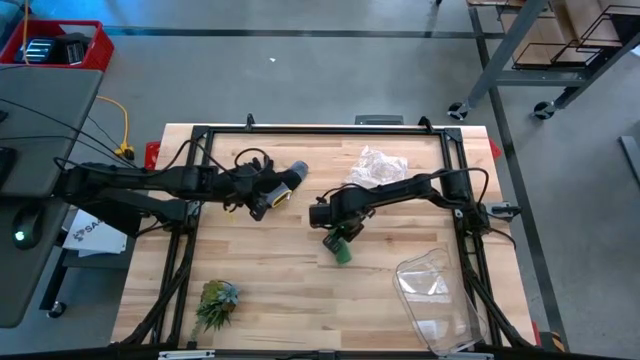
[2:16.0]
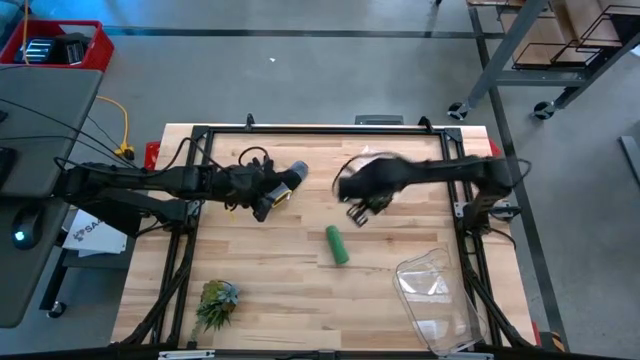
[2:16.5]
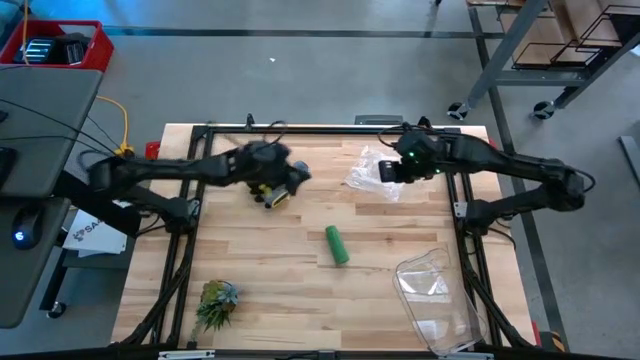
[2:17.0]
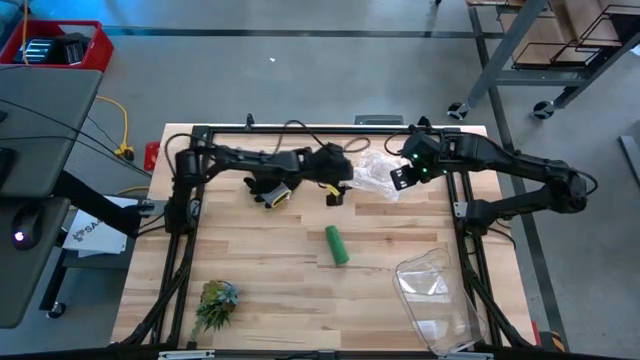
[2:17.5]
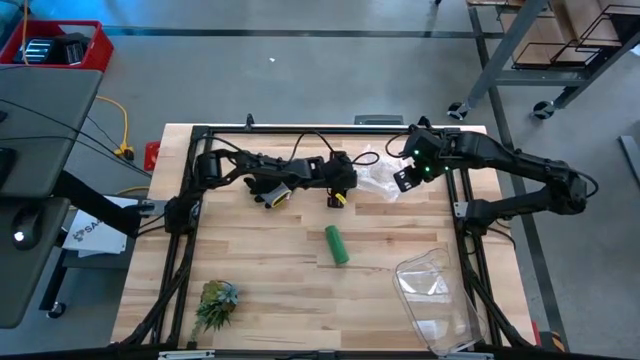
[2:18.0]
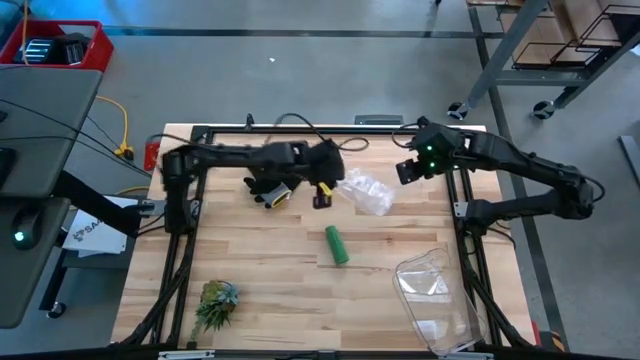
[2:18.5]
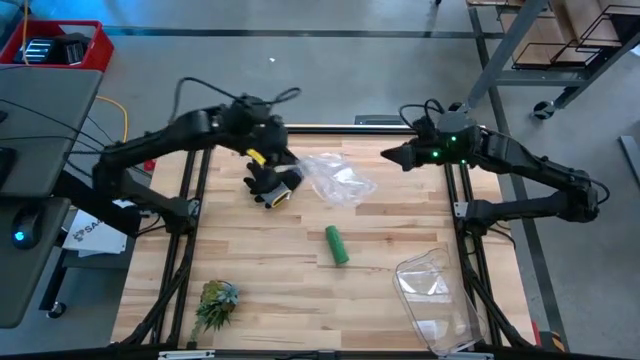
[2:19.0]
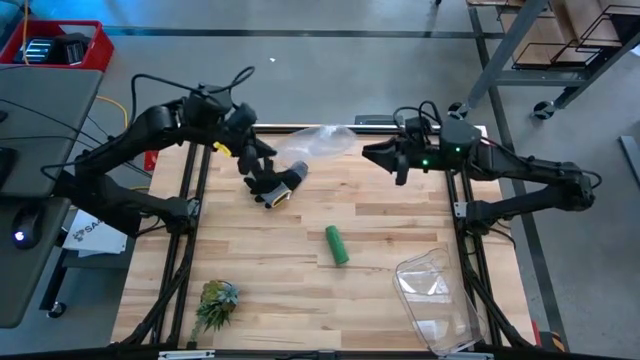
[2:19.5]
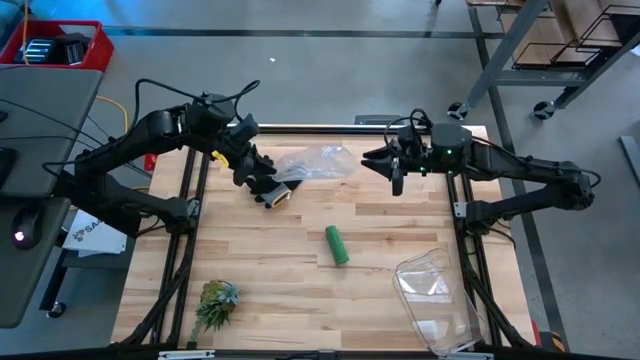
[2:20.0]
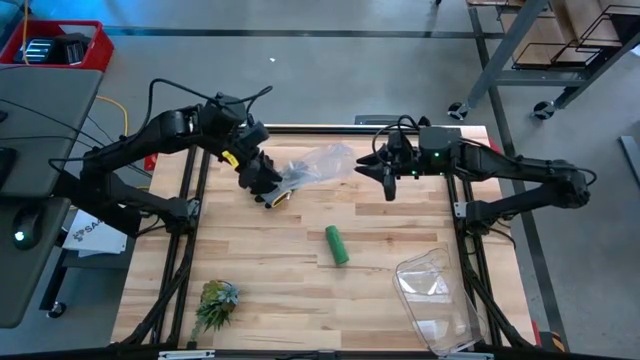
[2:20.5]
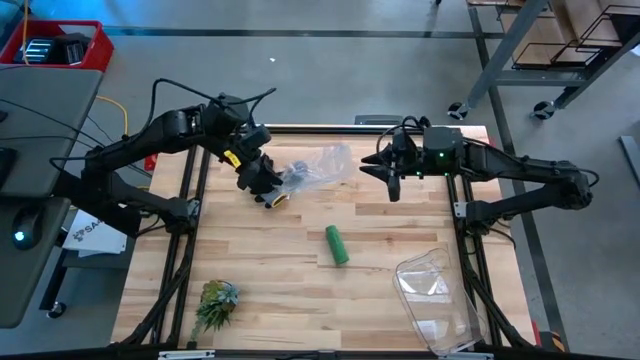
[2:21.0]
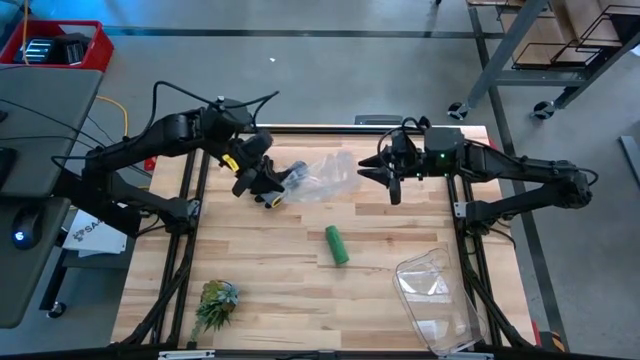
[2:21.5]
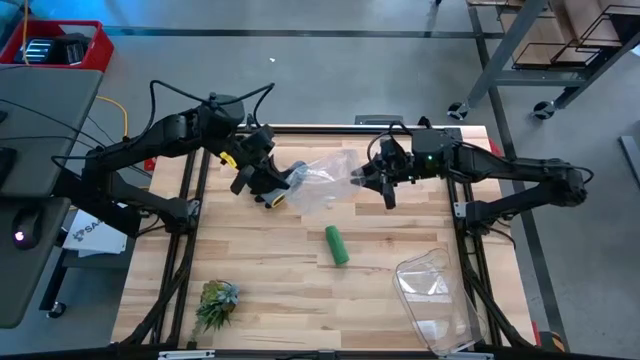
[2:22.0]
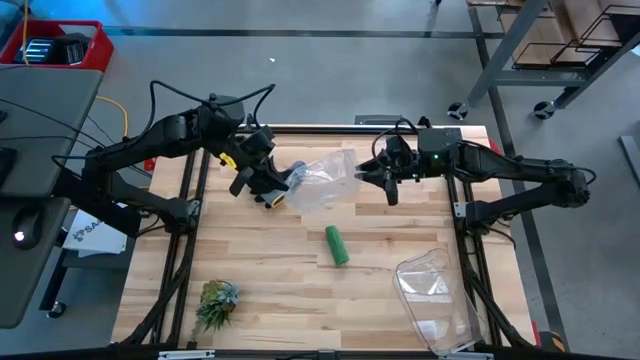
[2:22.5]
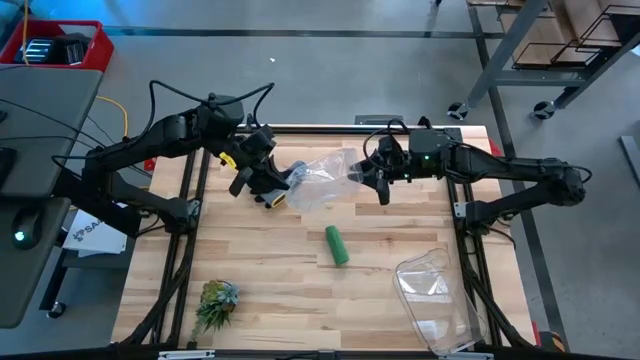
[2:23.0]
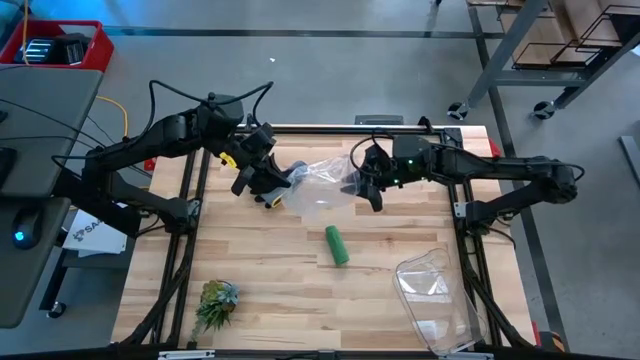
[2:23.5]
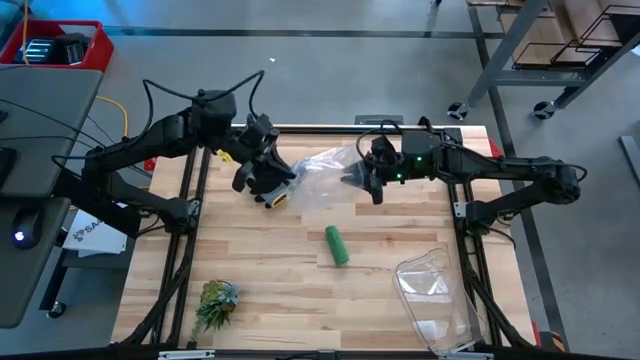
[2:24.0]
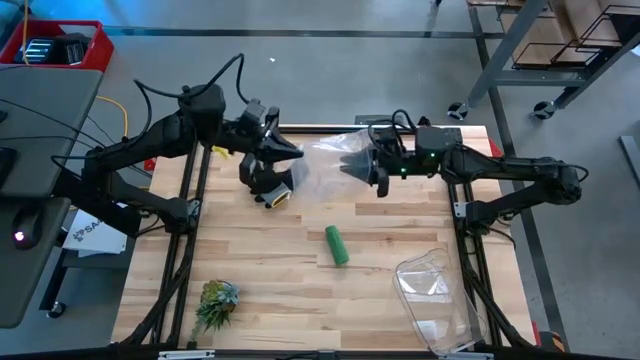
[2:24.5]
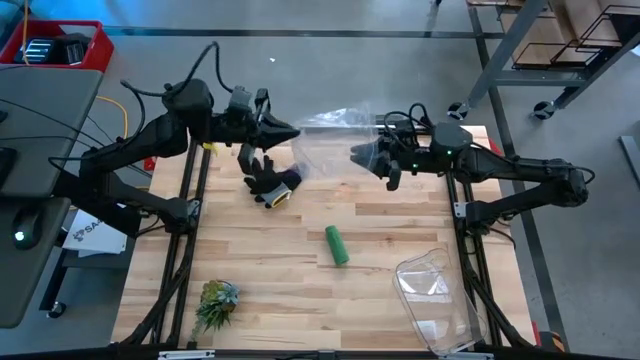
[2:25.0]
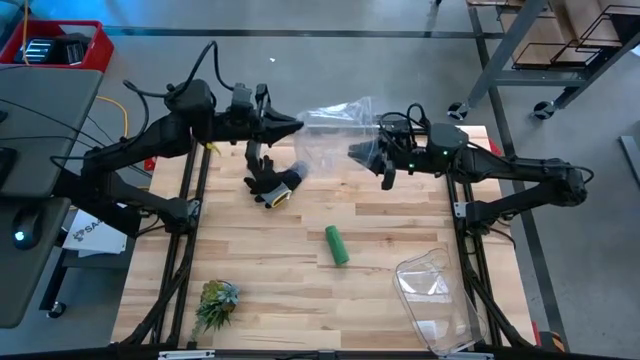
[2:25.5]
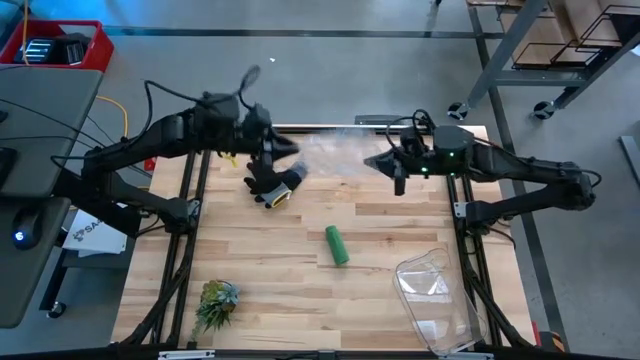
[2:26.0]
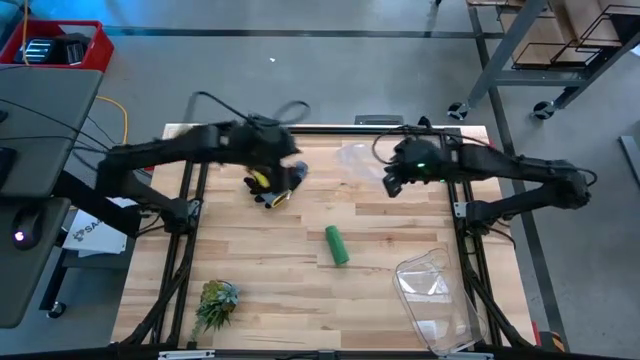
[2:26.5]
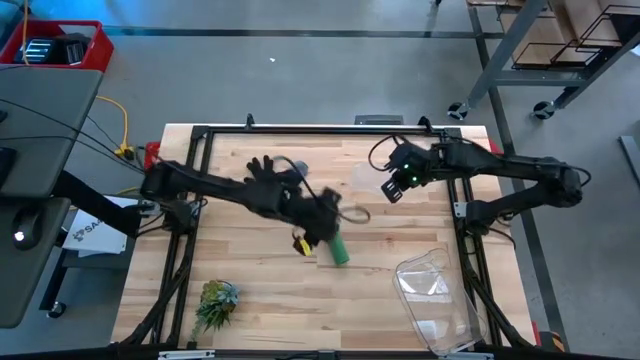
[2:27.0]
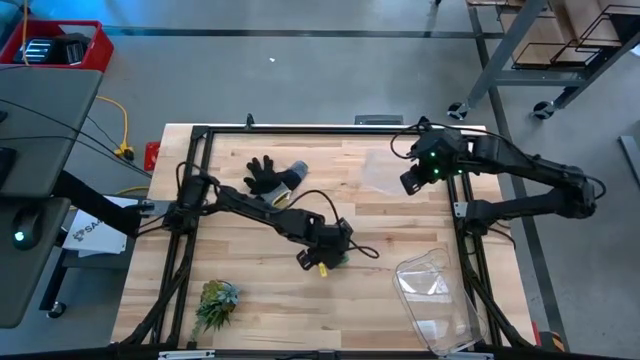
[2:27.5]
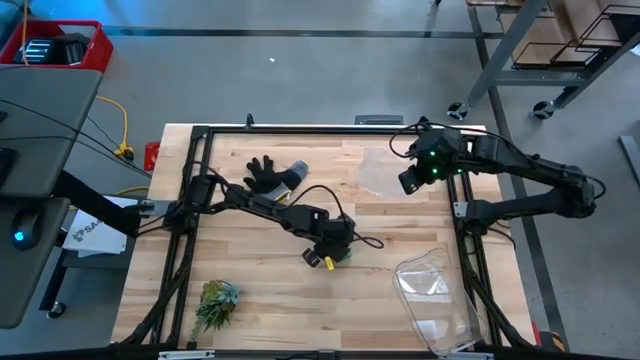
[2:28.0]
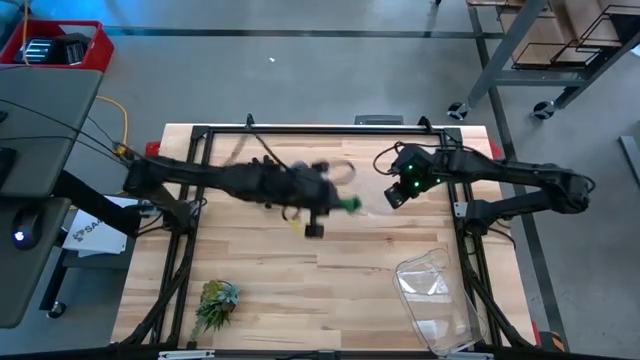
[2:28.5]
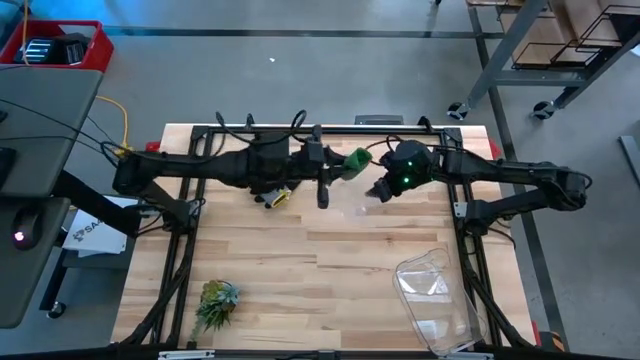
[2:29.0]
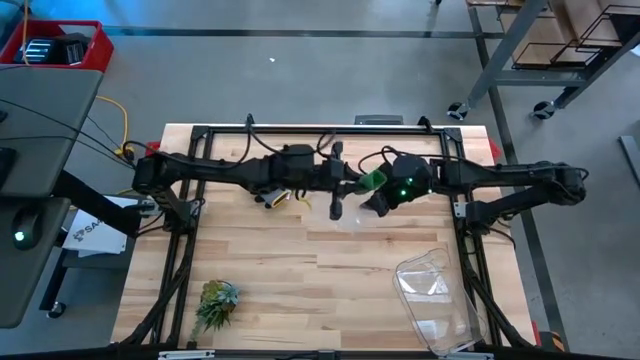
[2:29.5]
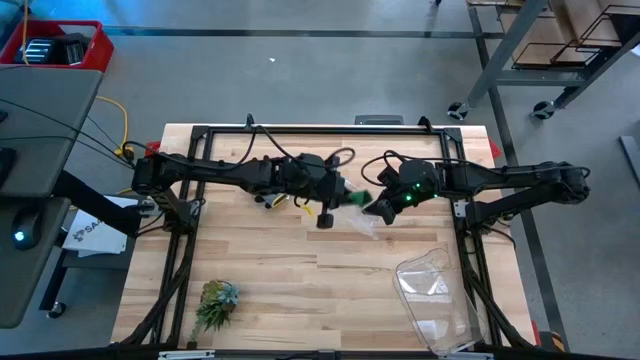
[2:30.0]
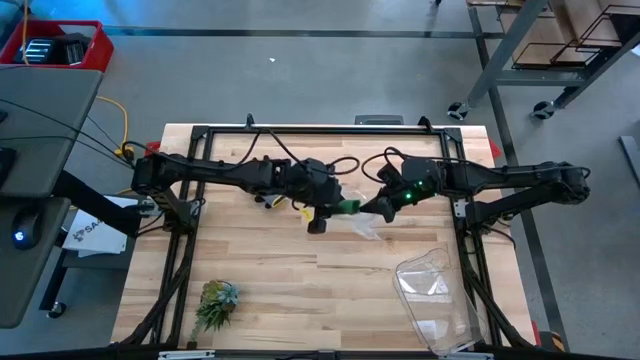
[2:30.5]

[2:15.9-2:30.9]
Task: Roll bandage
Put the green bandage in the transparent zip bag

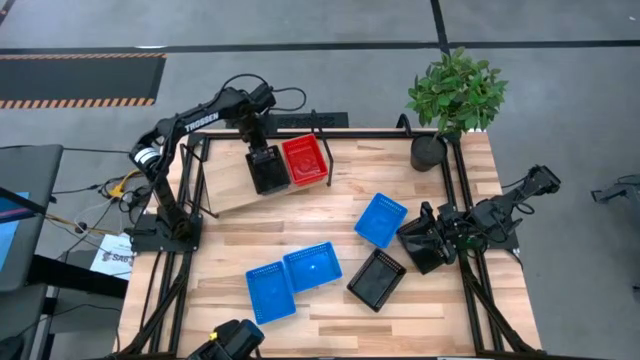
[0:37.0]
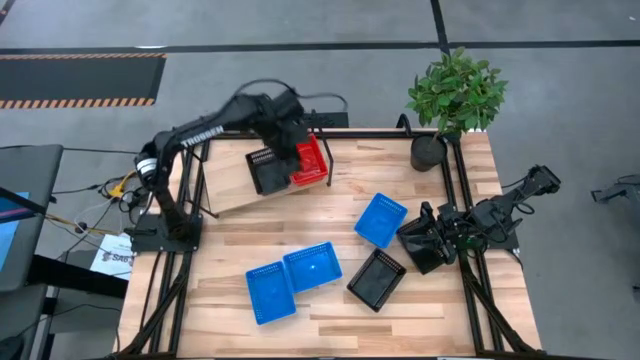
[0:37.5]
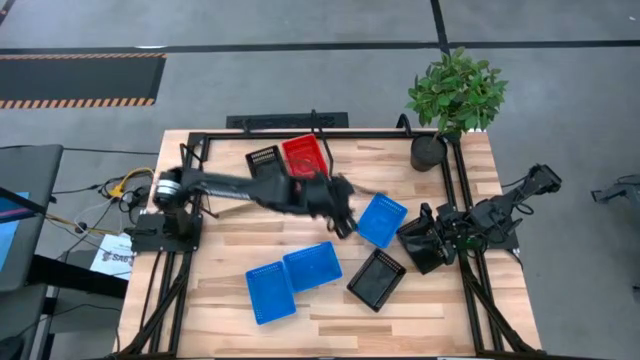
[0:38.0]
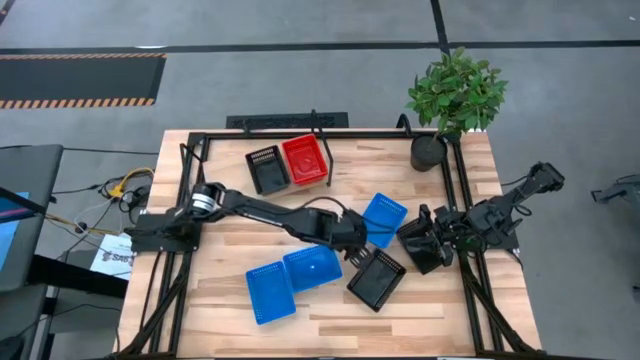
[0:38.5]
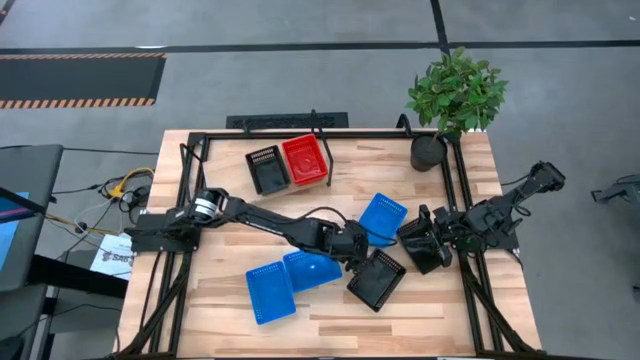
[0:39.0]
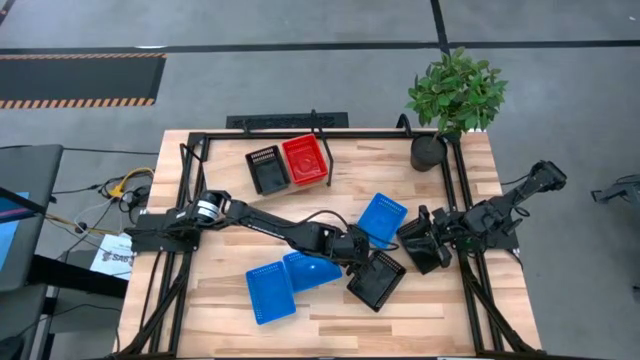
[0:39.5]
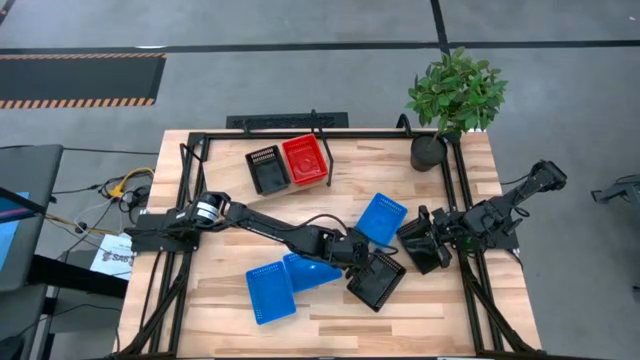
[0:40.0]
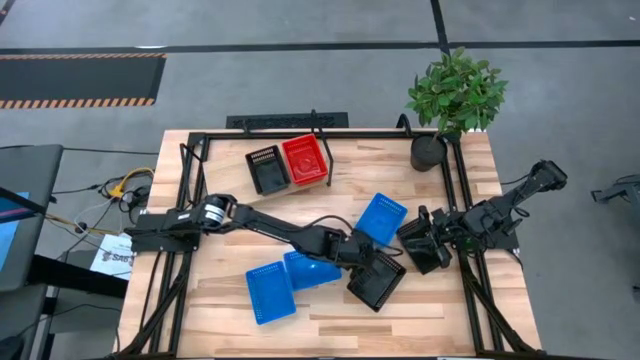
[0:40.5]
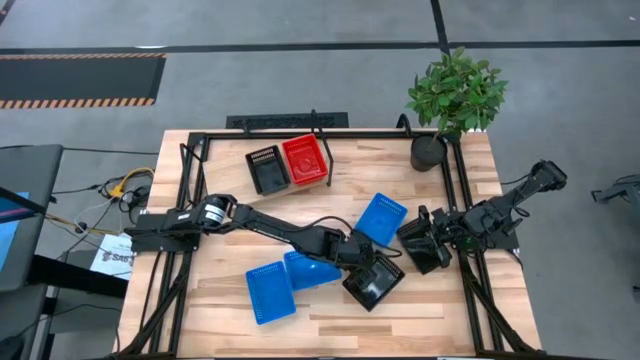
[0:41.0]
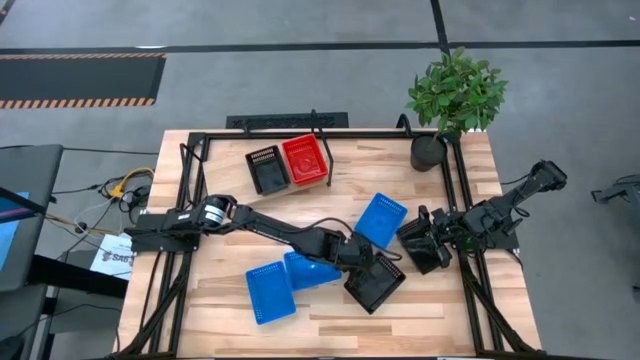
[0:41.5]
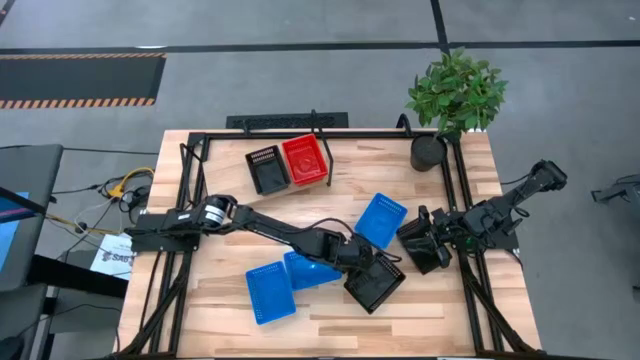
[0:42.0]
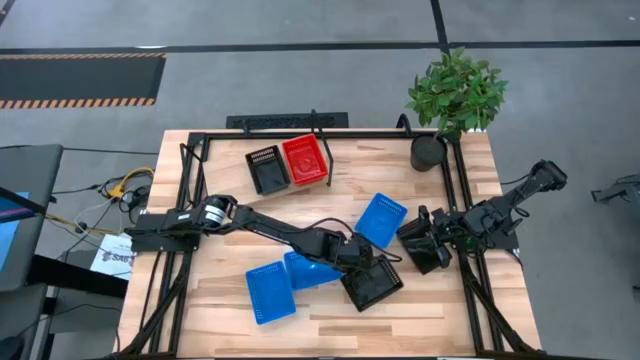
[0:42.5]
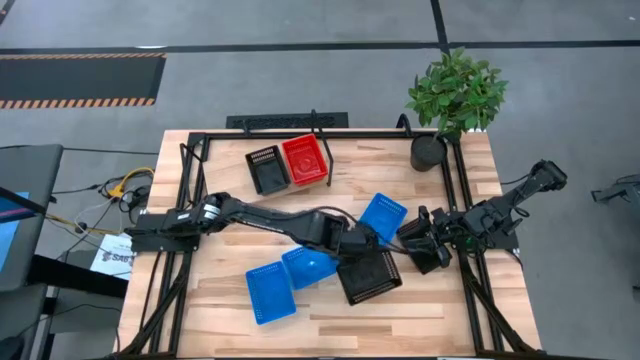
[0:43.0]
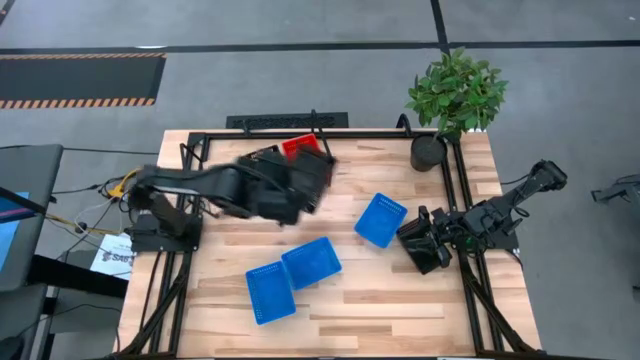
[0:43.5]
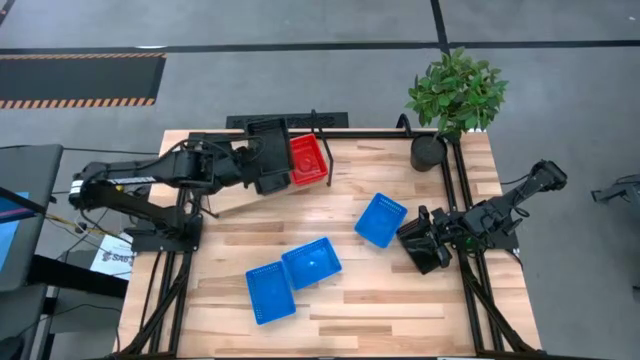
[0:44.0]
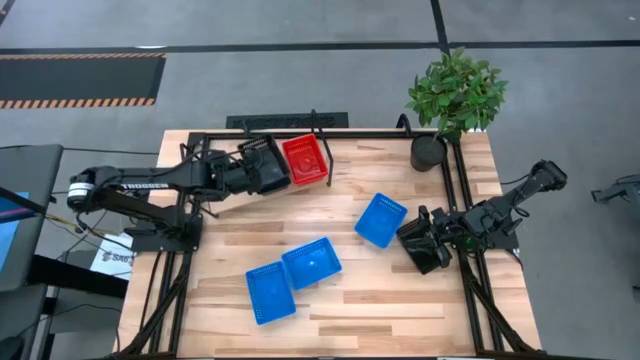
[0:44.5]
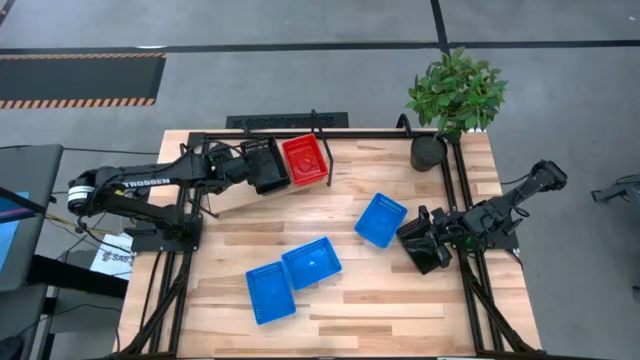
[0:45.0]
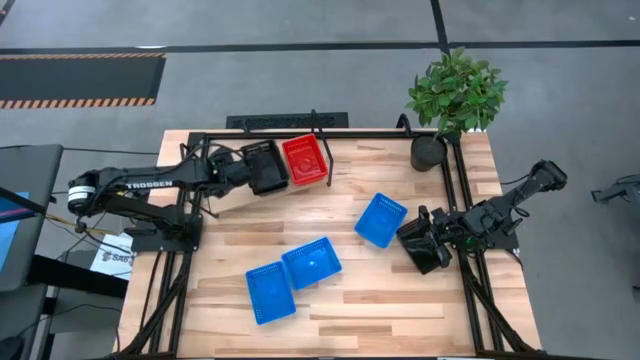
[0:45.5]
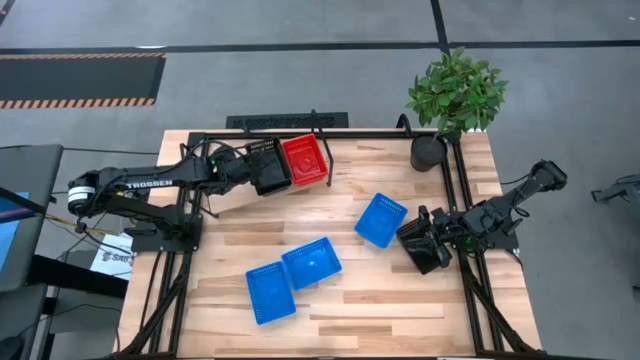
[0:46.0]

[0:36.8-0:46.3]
Task: Stack baskets on shelf by color
Stack the left black bin on top of the black bin on the shelf
